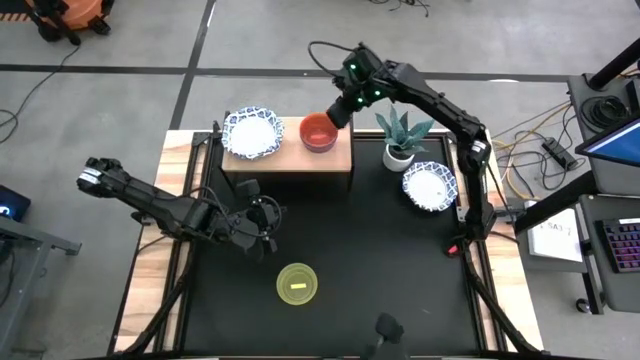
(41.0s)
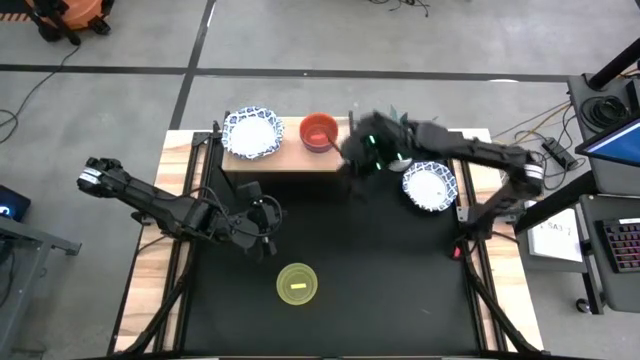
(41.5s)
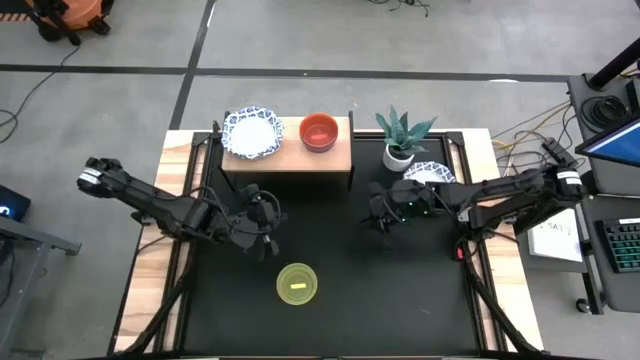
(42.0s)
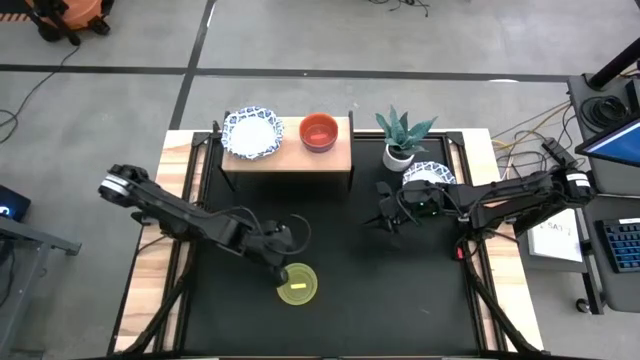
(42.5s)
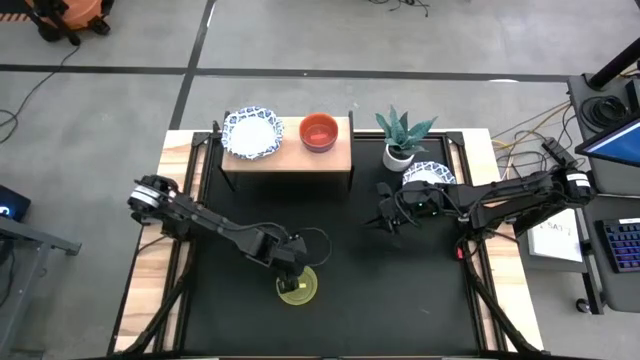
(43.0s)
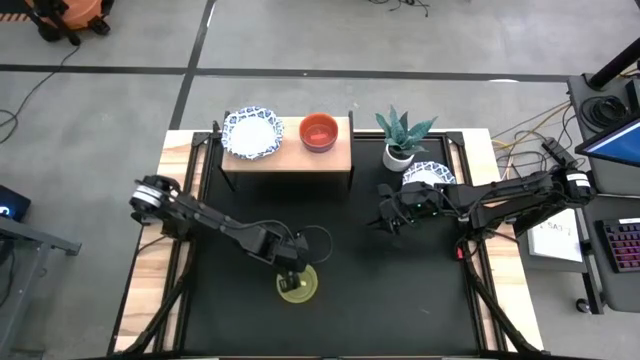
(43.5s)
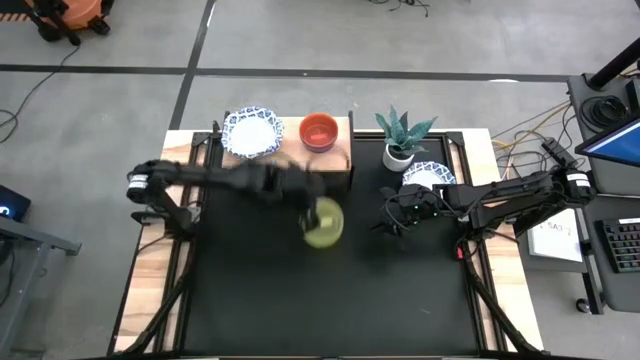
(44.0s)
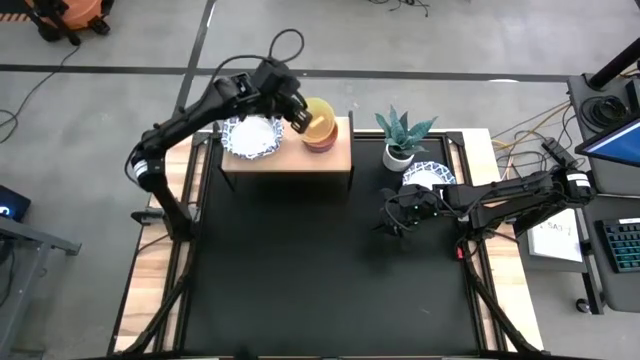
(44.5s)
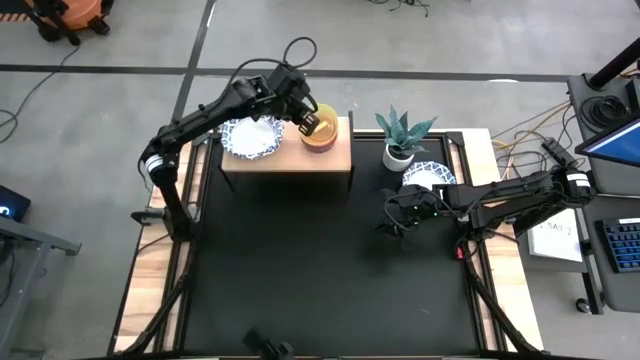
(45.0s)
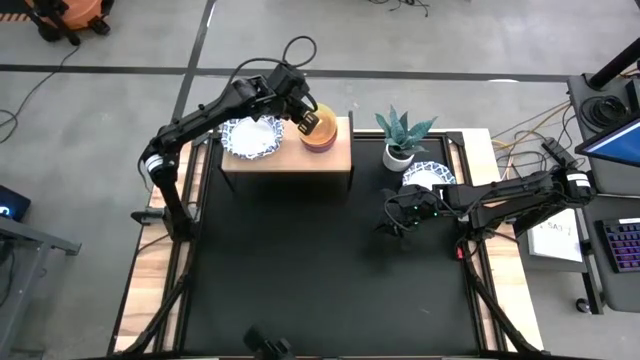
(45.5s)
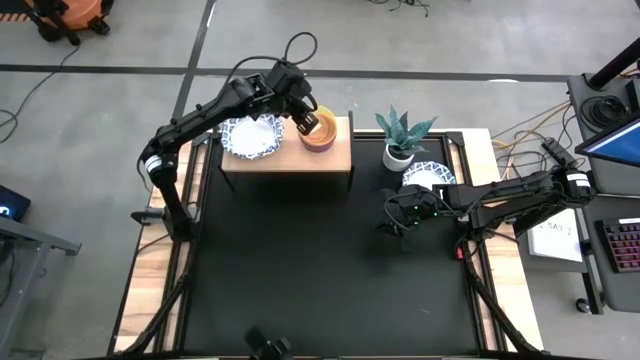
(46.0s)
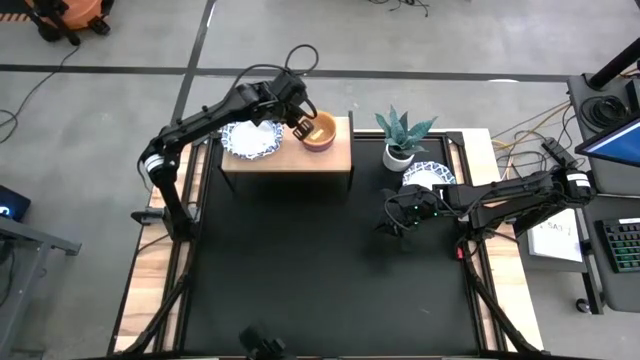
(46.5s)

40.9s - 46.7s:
Task: Place and stack bowls onto a shelf
Stack the yellow bowl on top of the orange bowl on the shelf

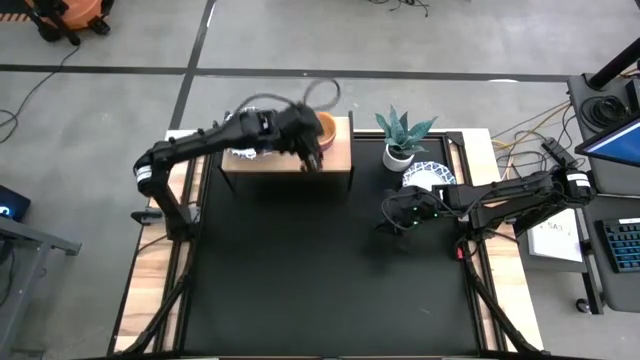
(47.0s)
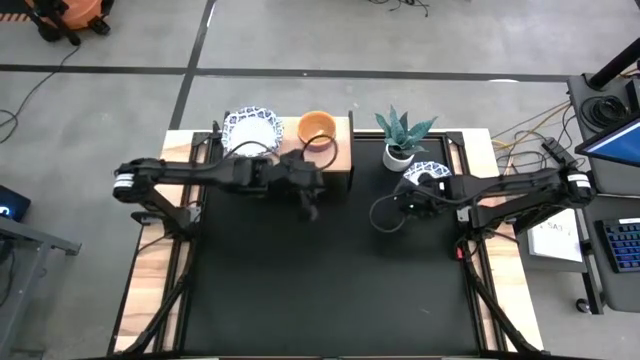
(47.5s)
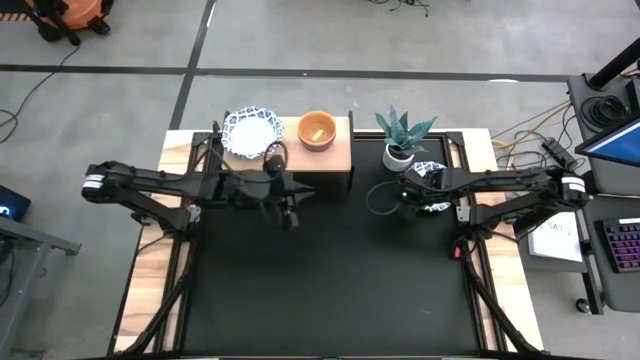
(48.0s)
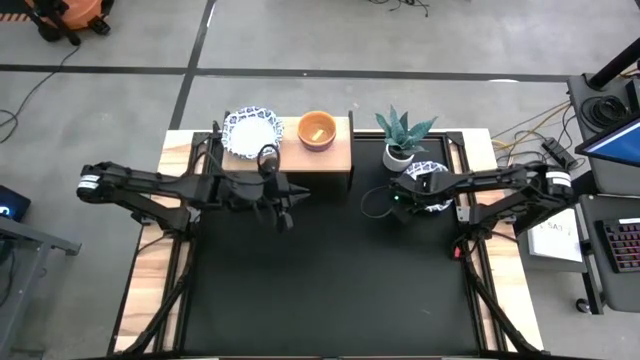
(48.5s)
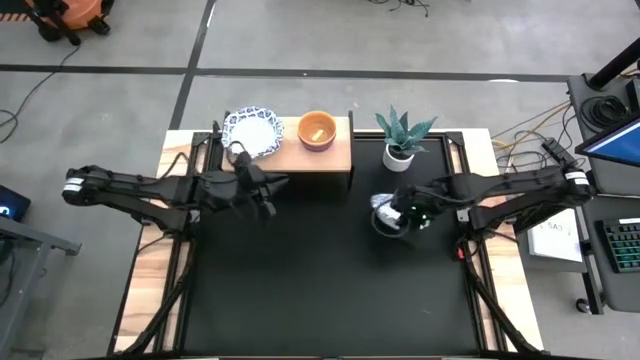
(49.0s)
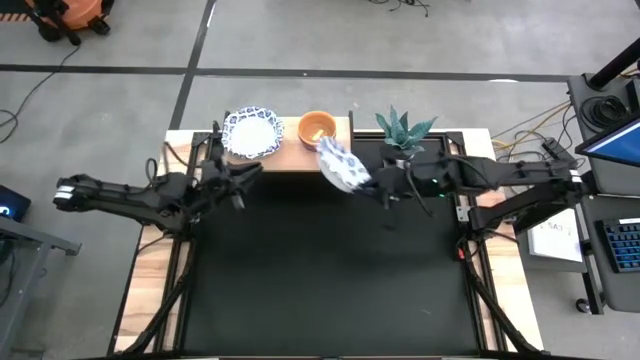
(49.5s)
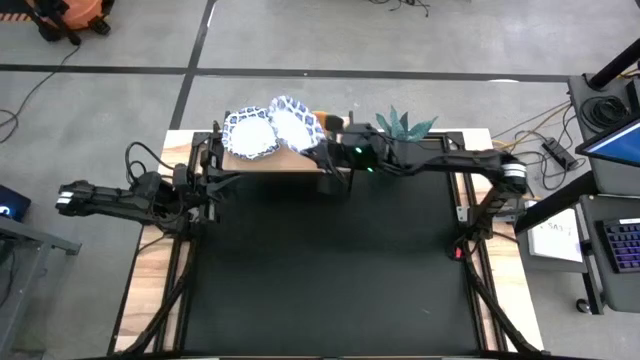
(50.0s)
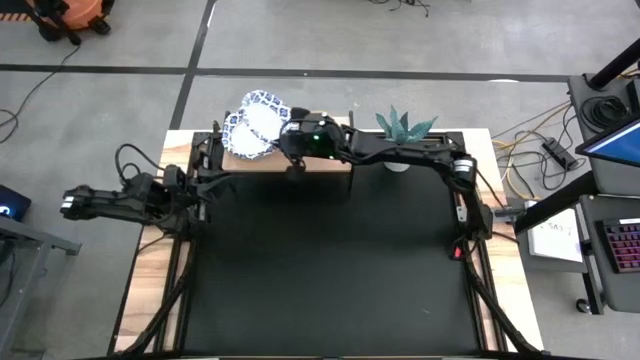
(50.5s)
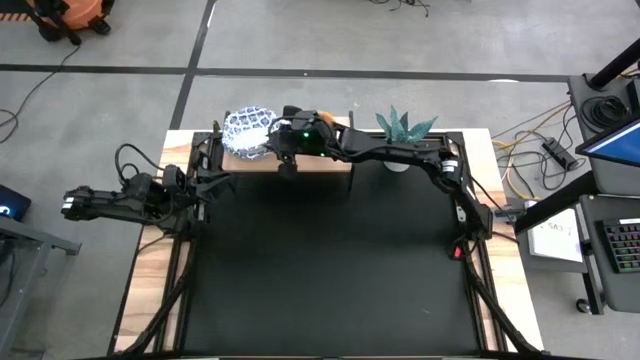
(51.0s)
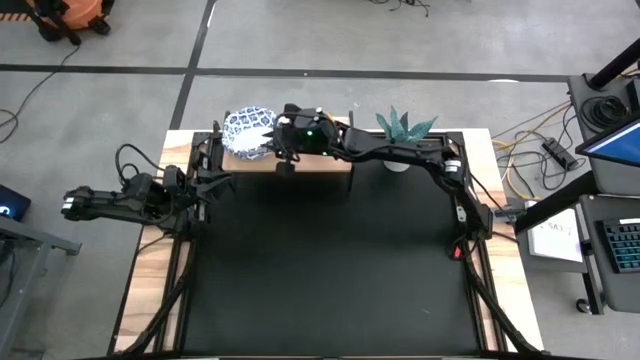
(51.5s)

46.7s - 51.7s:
Stack the blue patterned bowl on top of the blue patterned bowl on the shelf

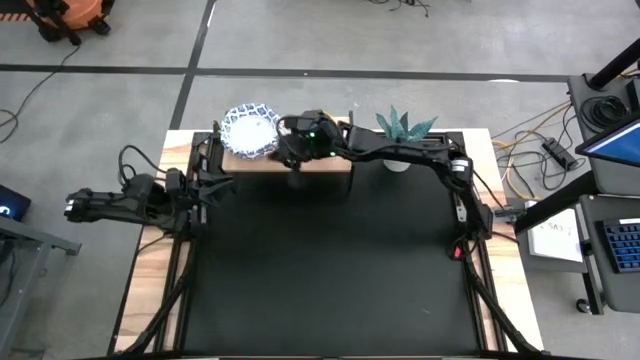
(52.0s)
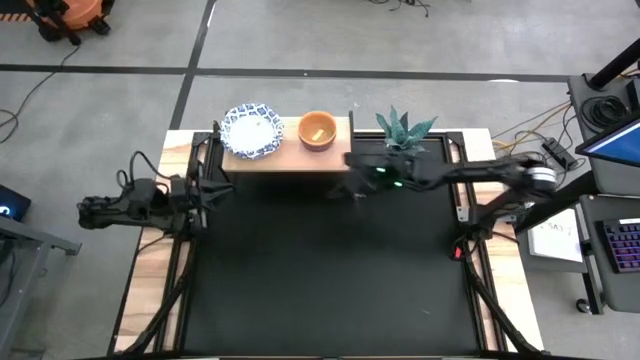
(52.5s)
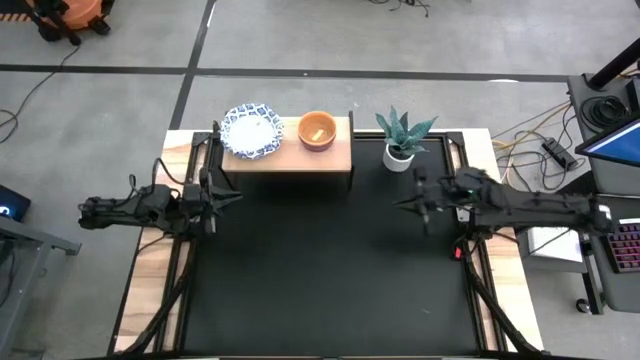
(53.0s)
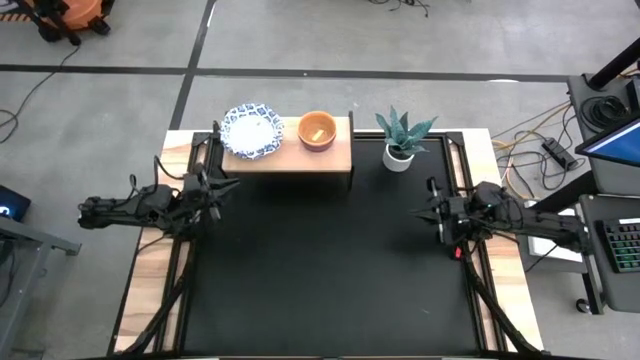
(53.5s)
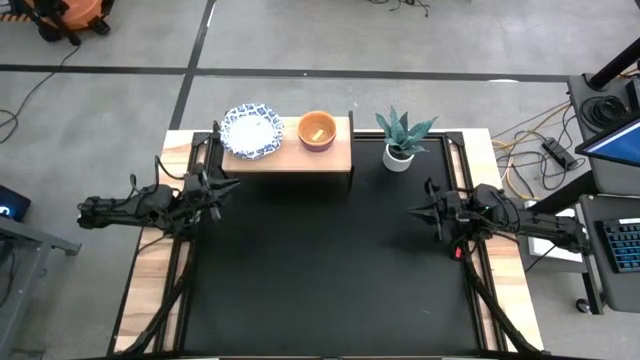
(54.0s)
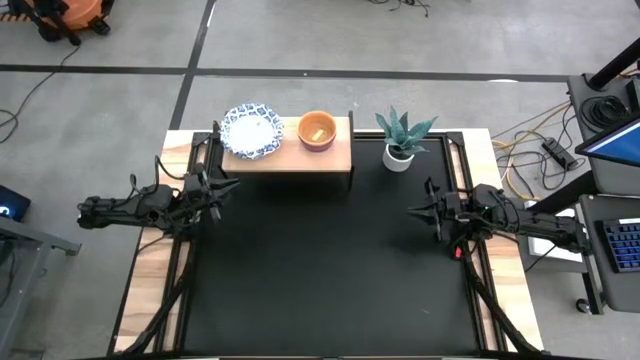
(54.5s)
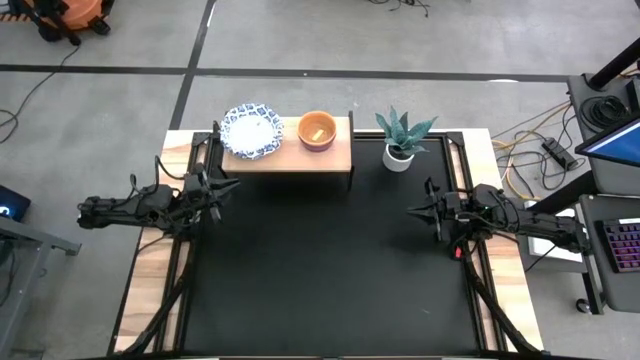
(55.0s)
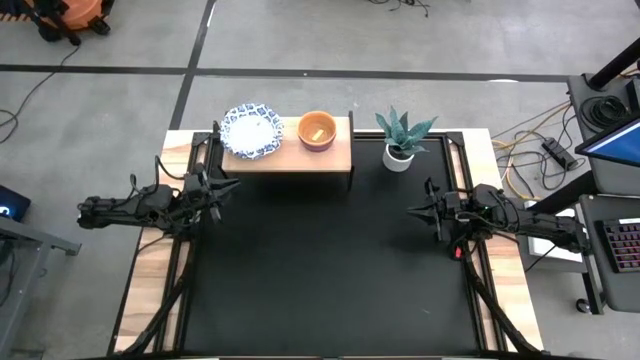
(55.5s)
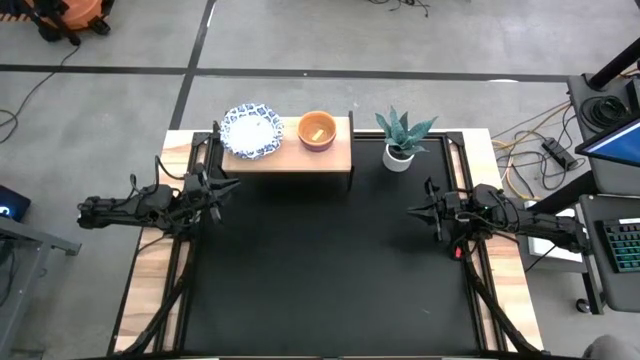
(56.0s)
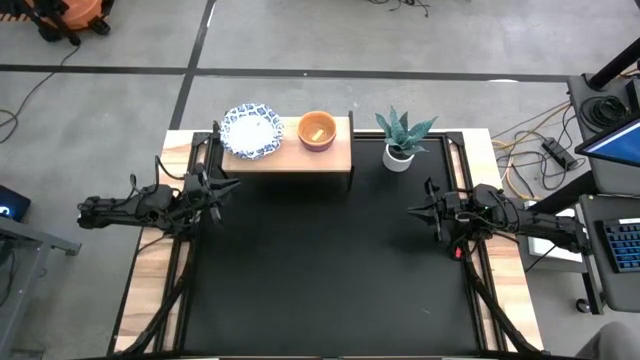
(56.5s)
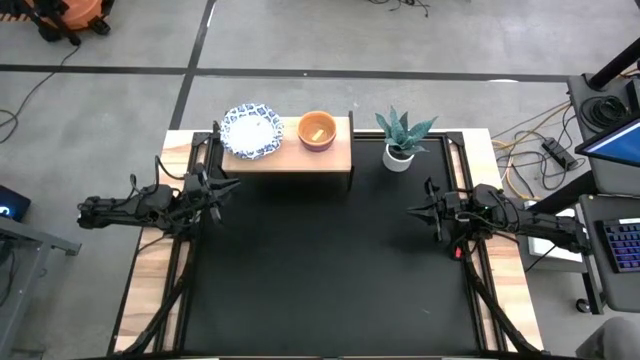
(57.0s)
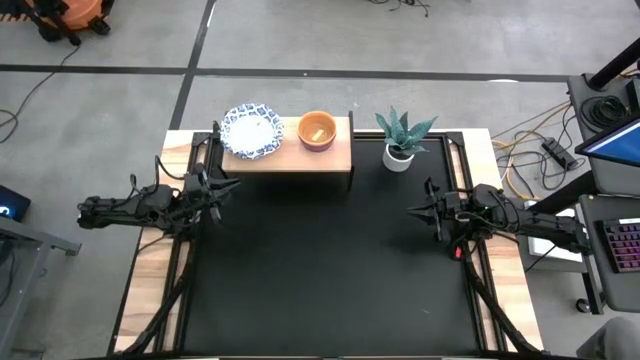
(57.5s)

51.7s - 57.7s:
Return to Home Position

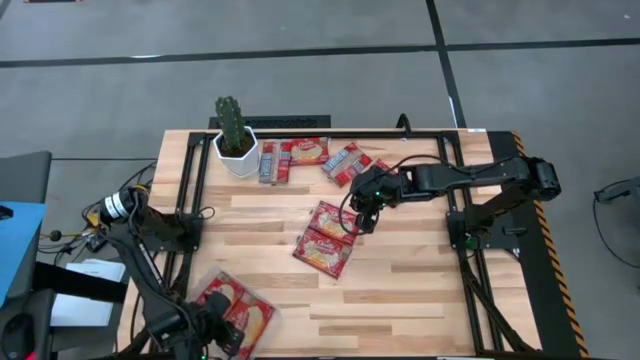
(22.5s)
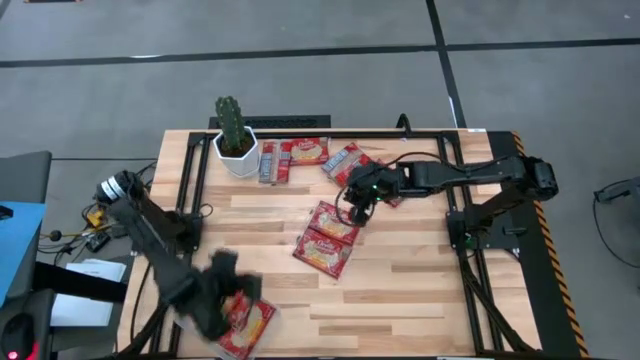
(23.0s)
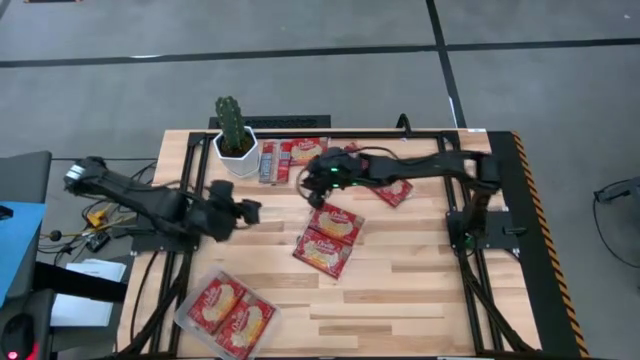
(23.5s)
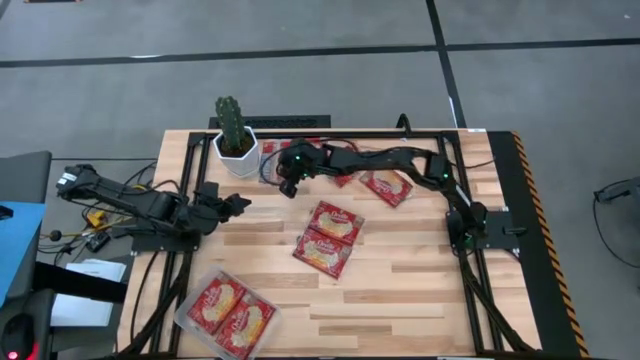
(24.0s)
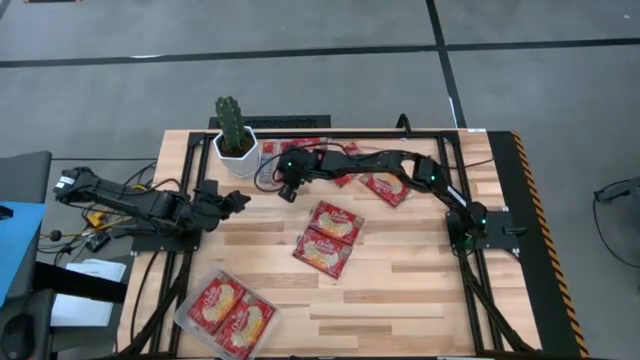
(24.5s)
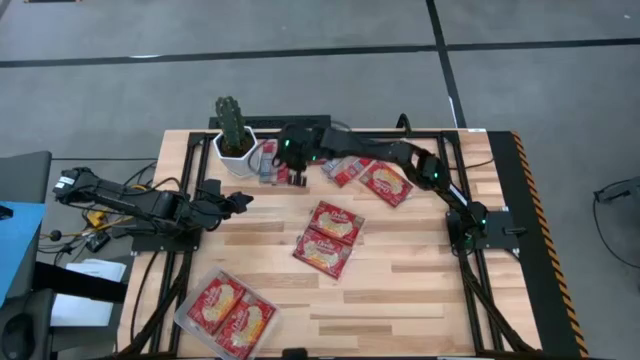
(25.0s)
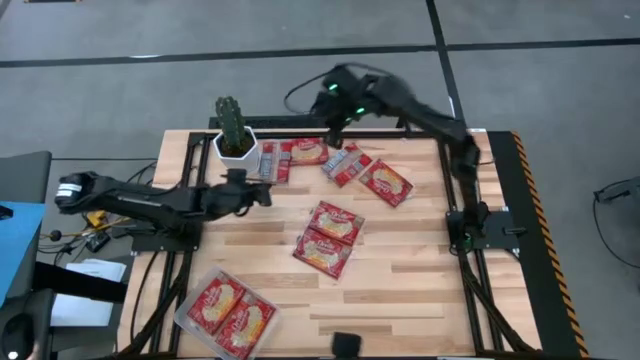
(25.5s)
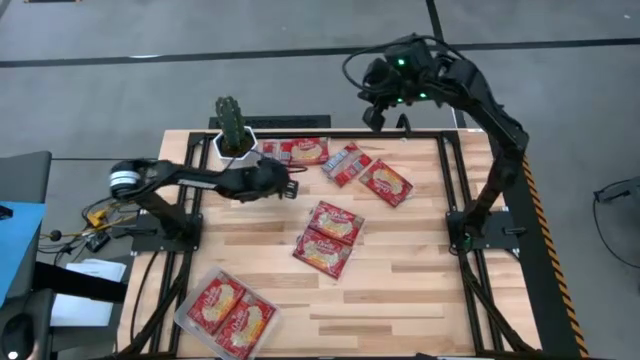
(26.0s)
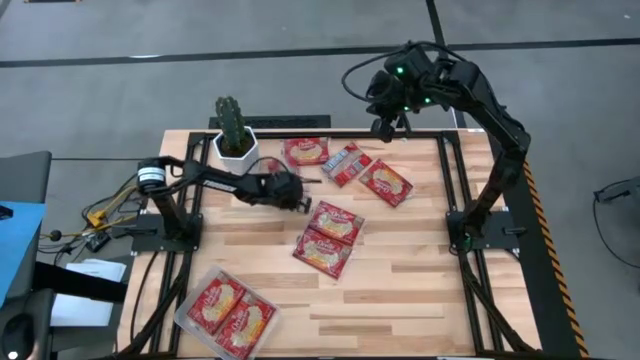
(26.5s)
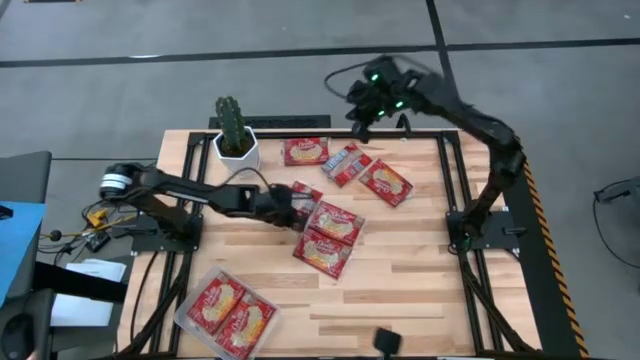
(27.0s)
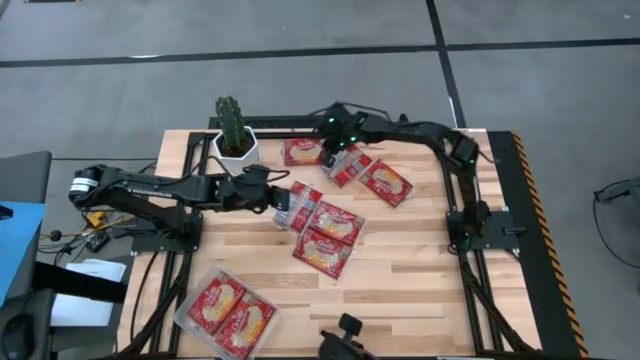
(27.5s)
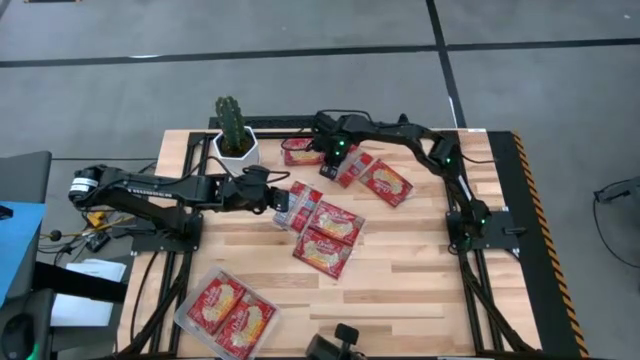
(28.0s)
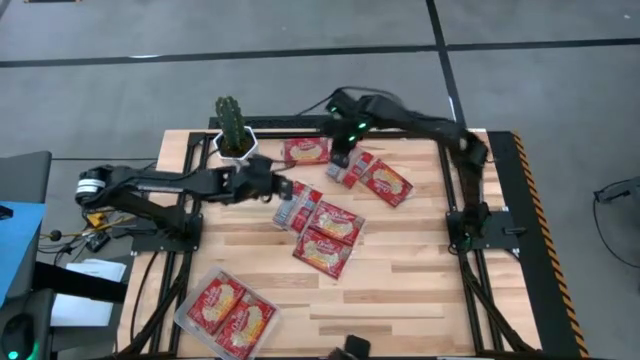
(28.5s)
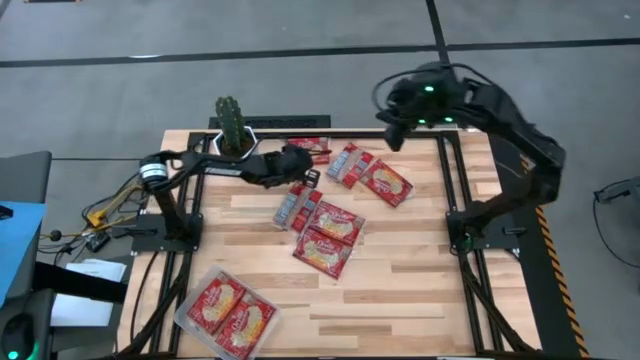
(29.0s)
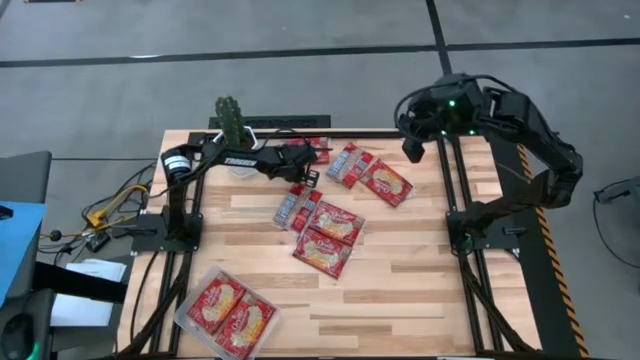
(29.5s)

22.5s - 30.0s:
Task: Sort popcorn bags into baskets
Adjust the red popcorn bags
